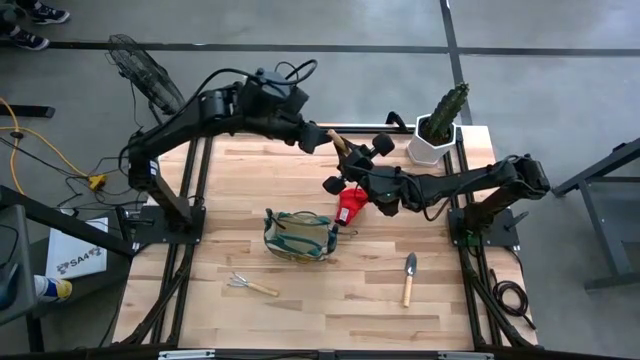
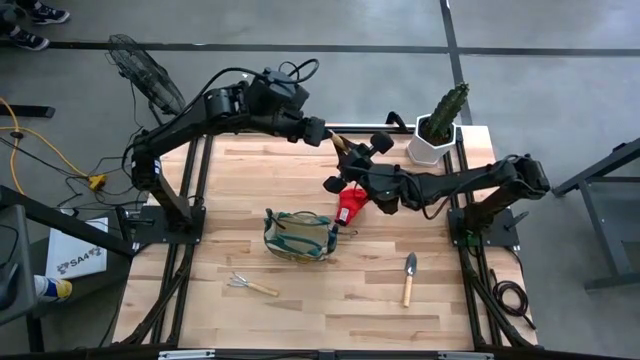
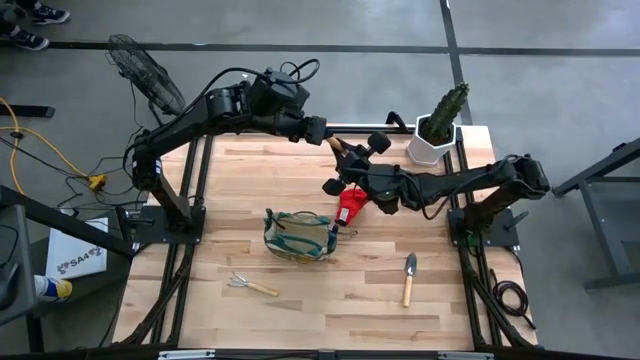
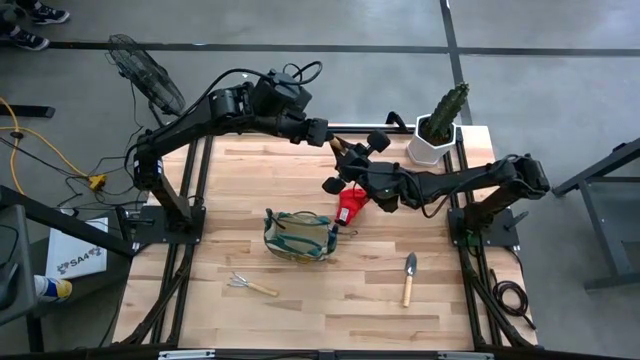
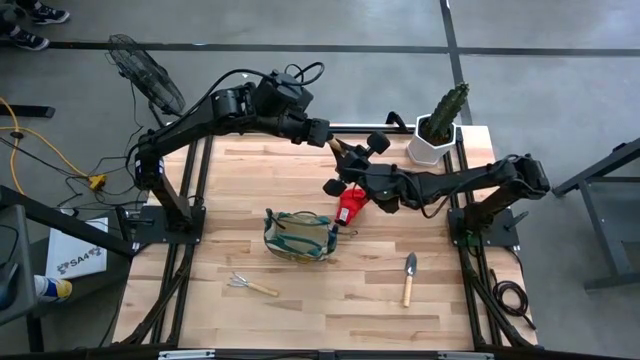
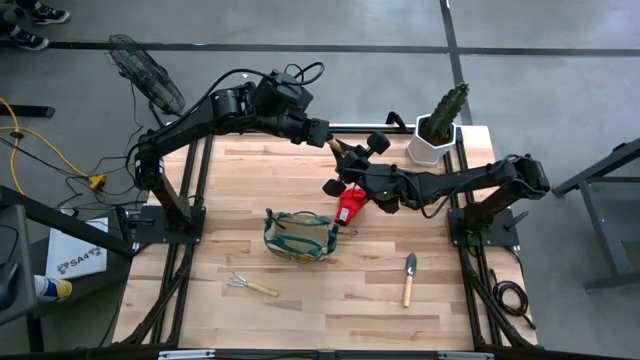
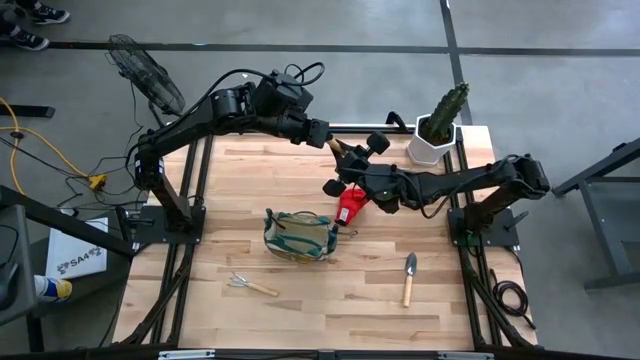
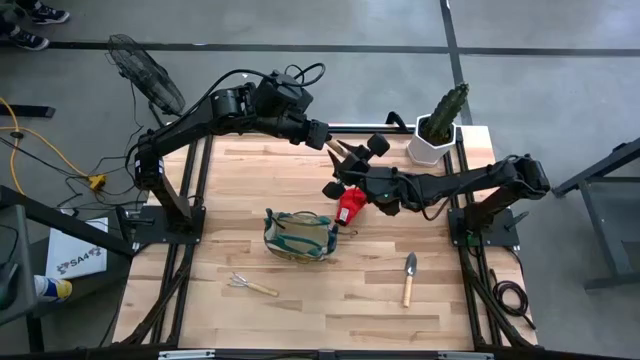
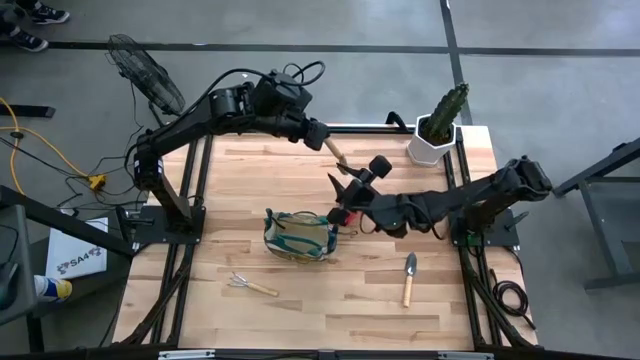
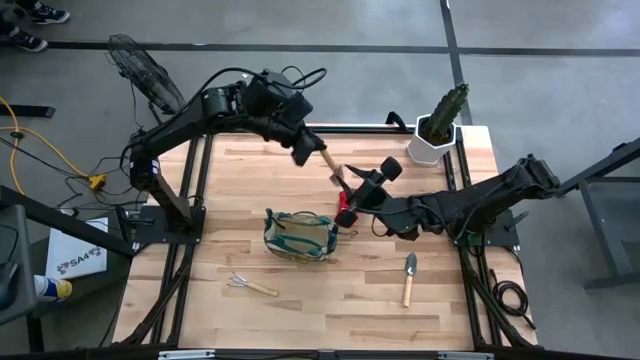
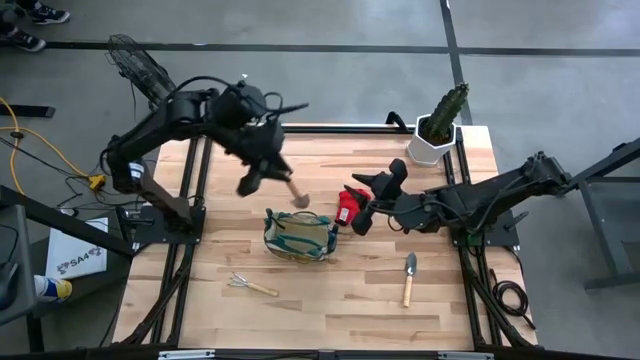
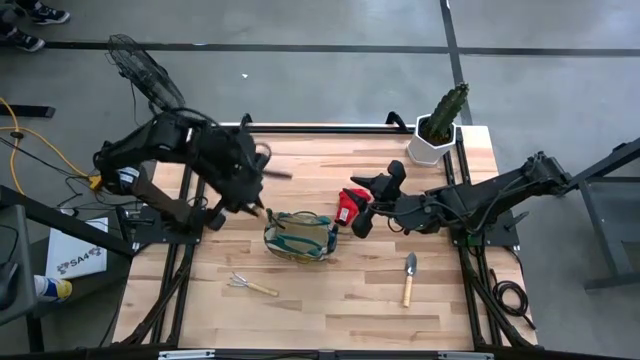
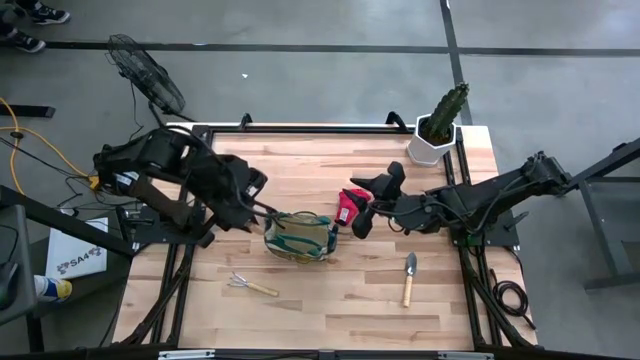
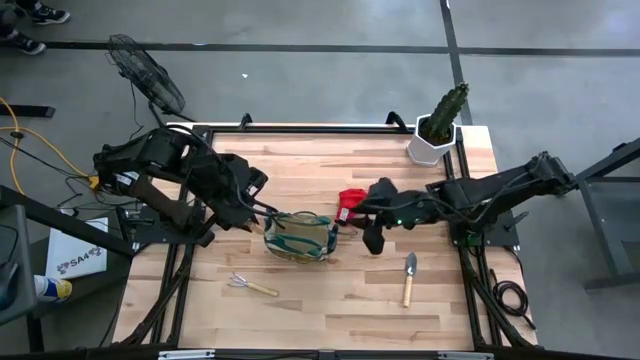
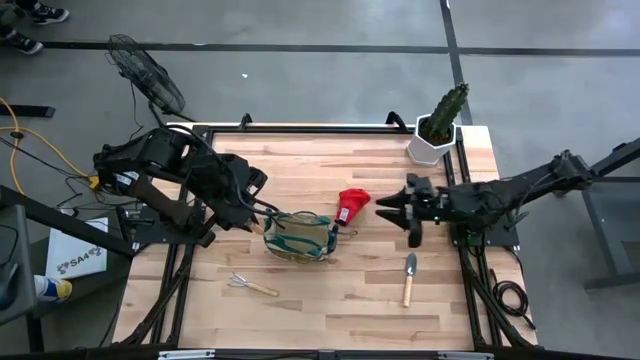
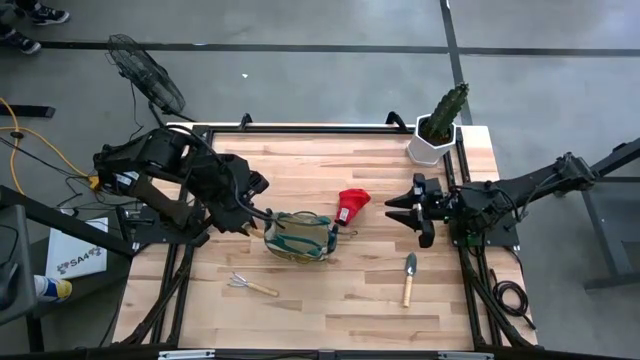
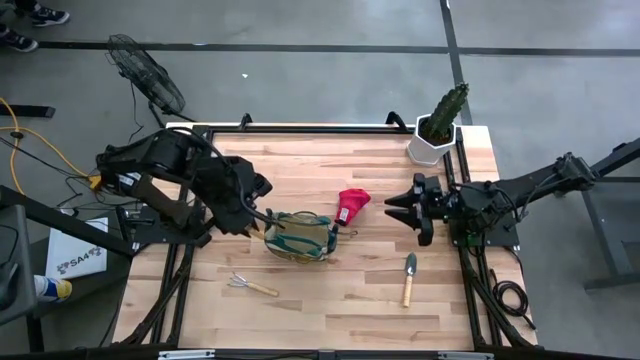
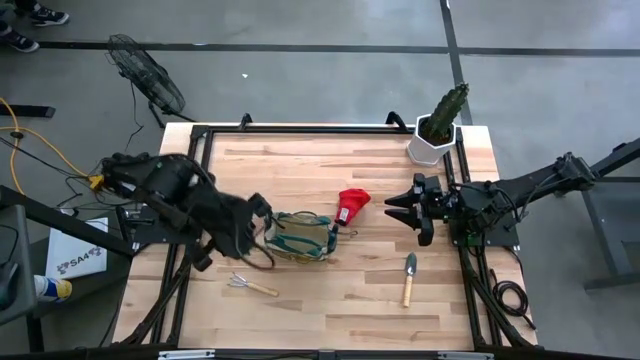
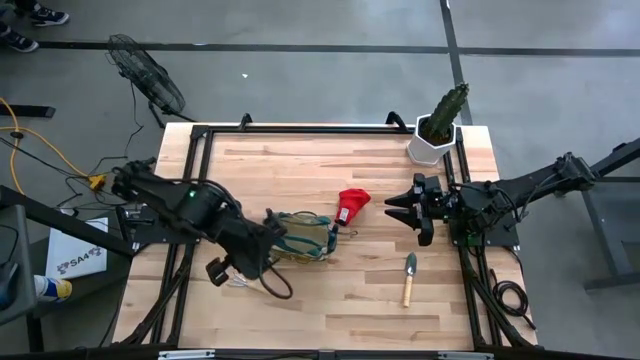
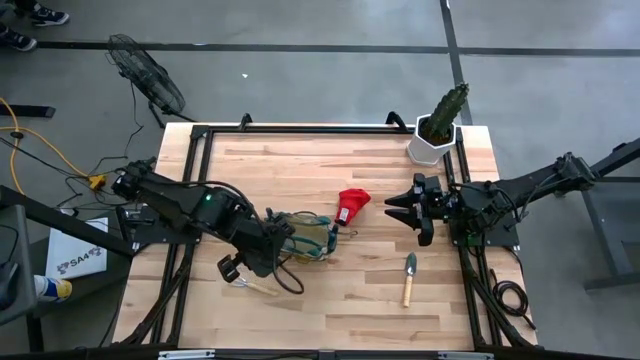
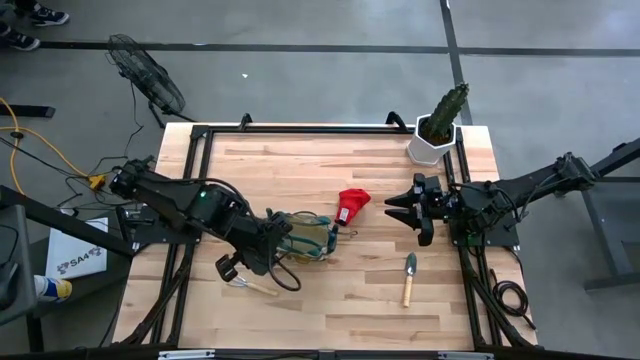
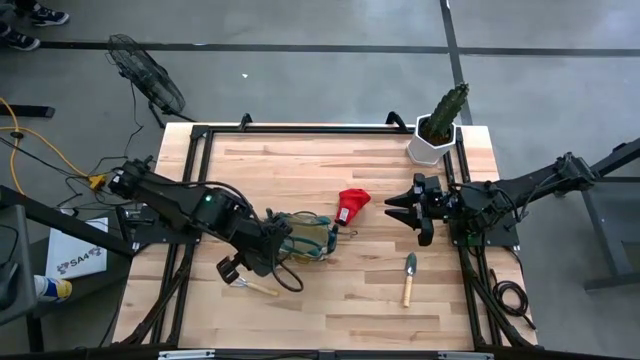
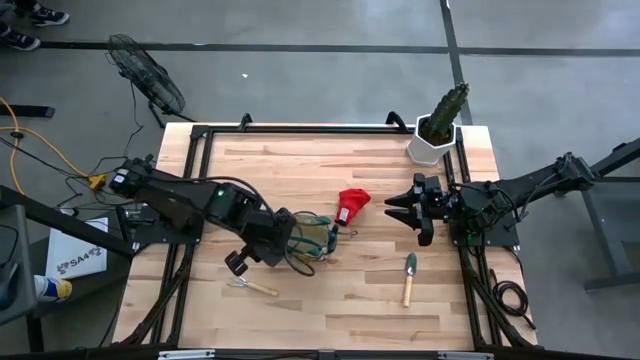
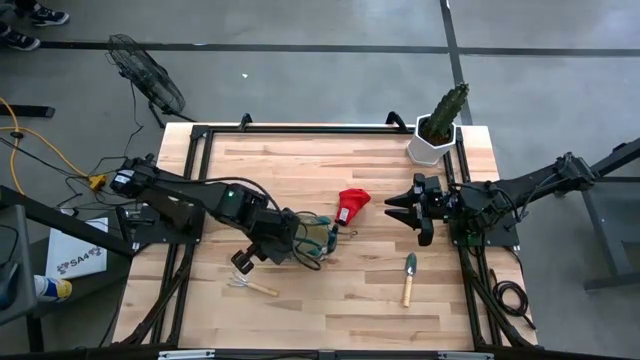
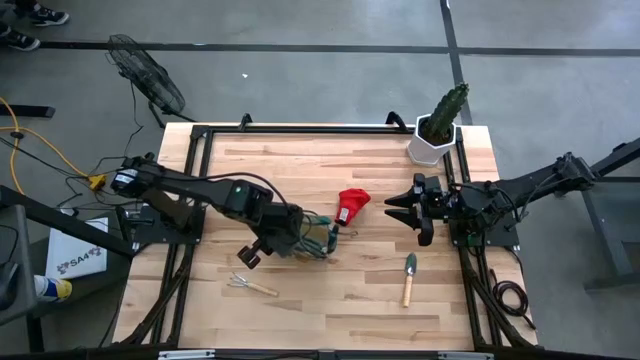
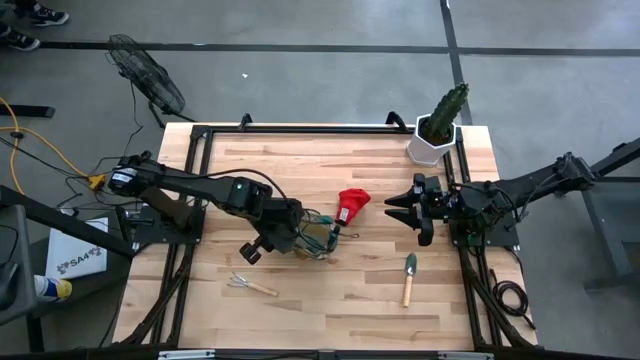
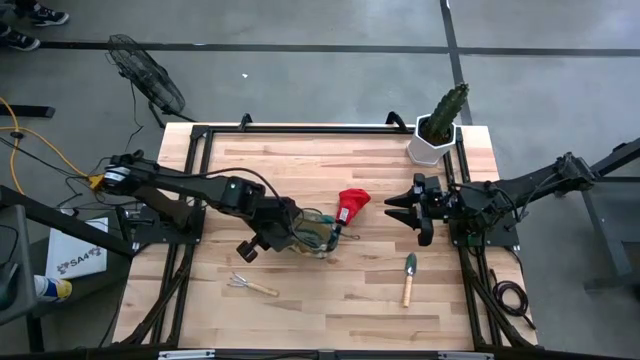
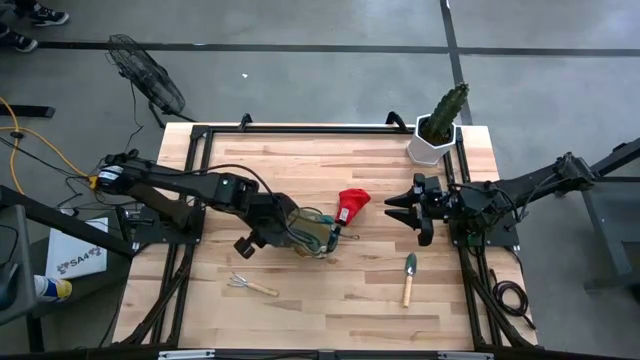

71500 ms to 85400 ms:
Task: Pick & Place Garden tools in Gardening bag
Put the left light brown trowel into the gardening bag

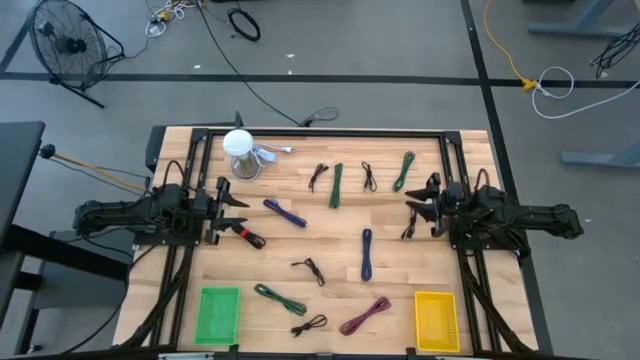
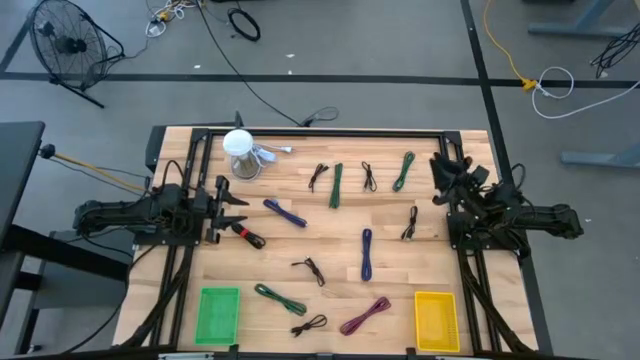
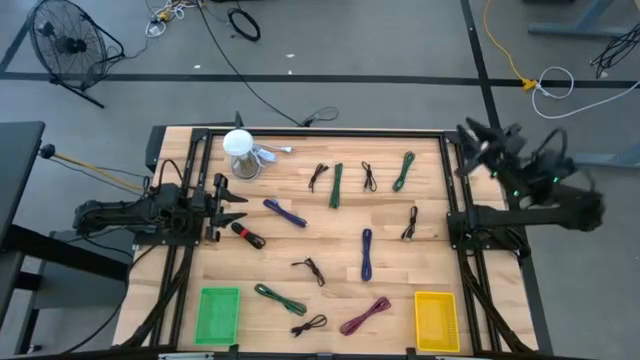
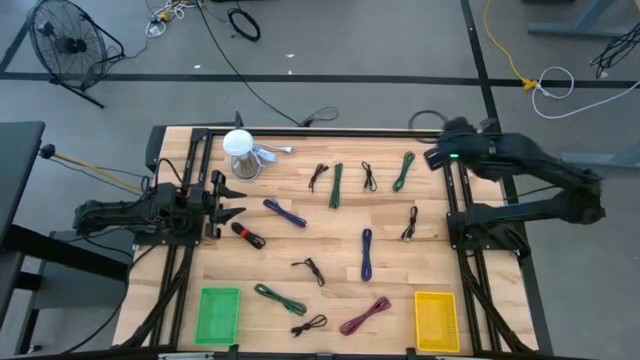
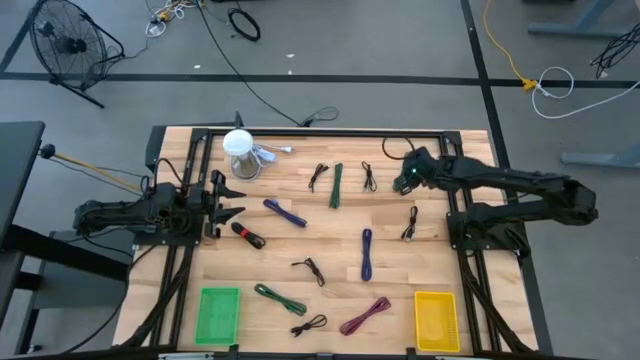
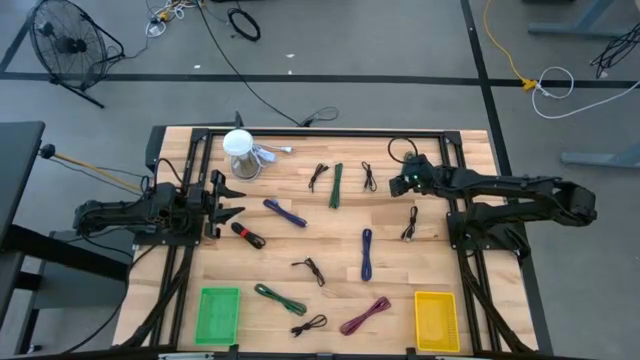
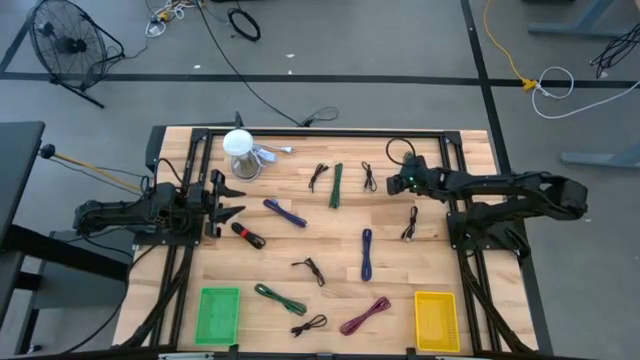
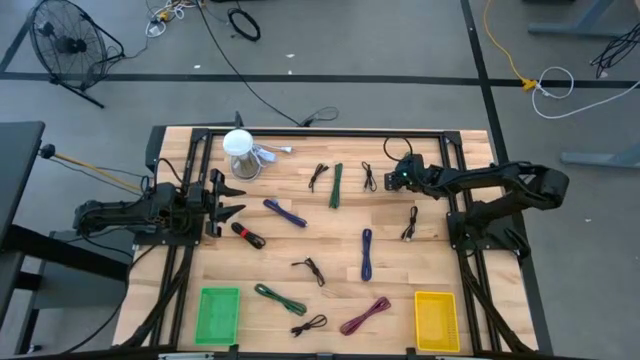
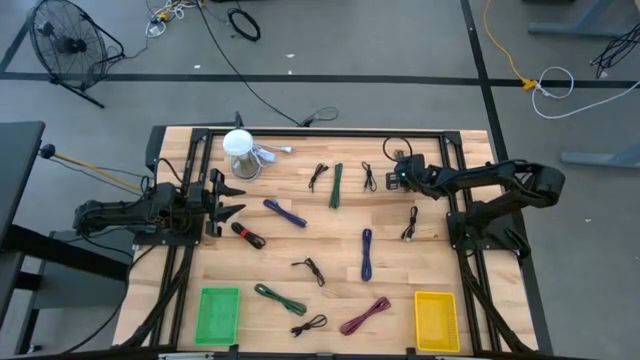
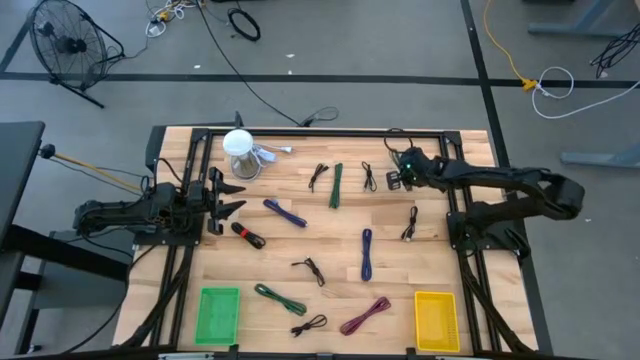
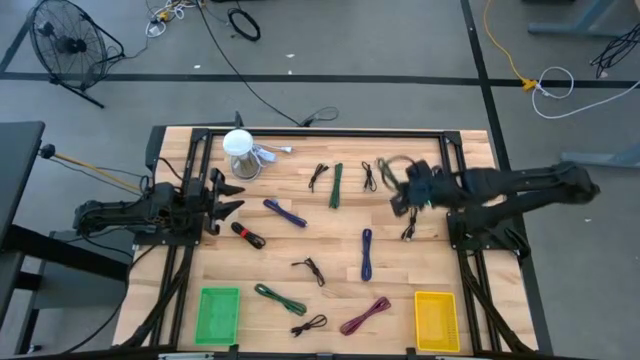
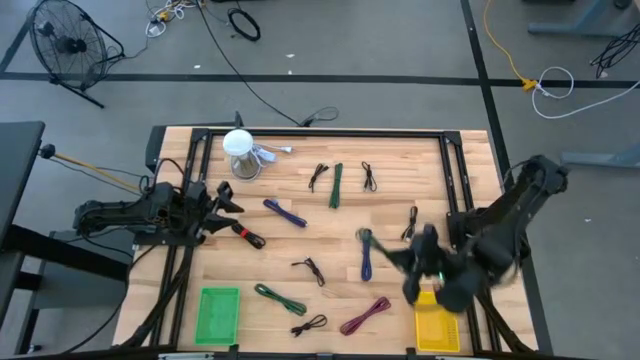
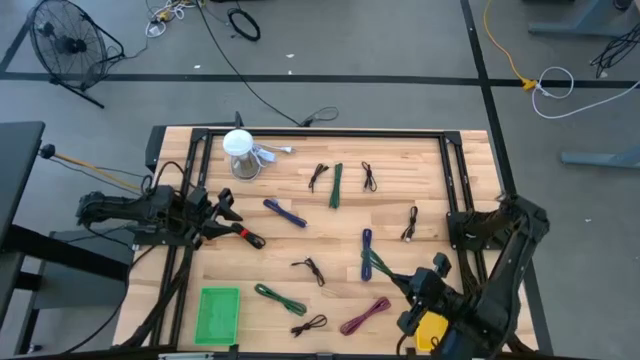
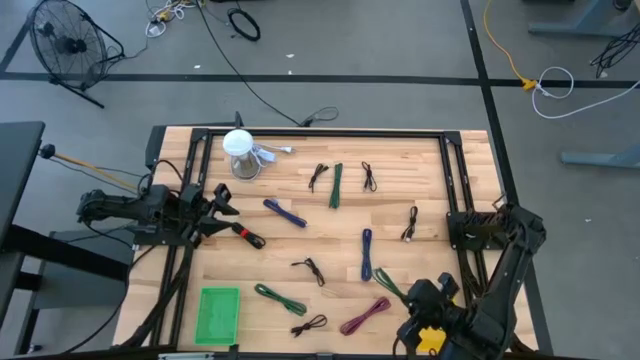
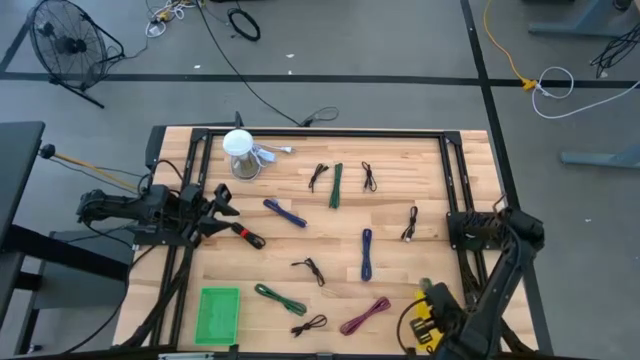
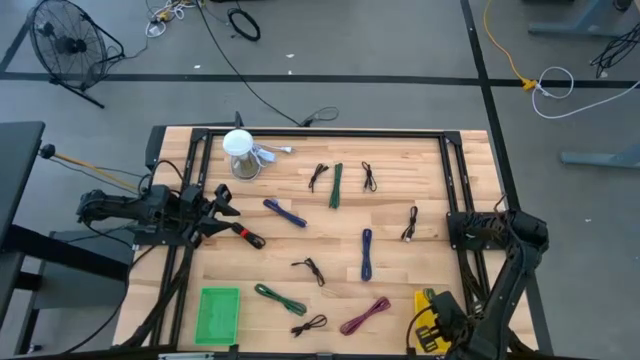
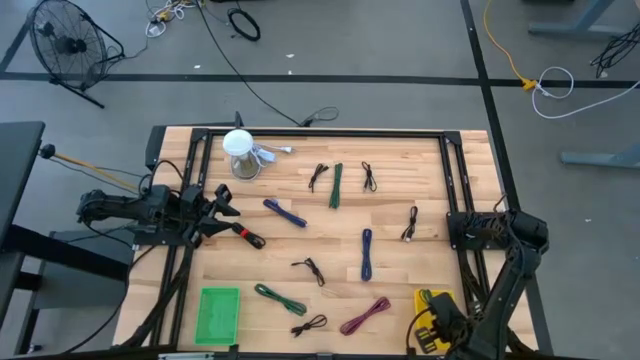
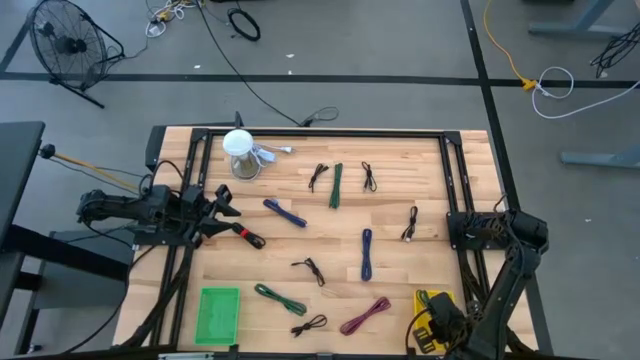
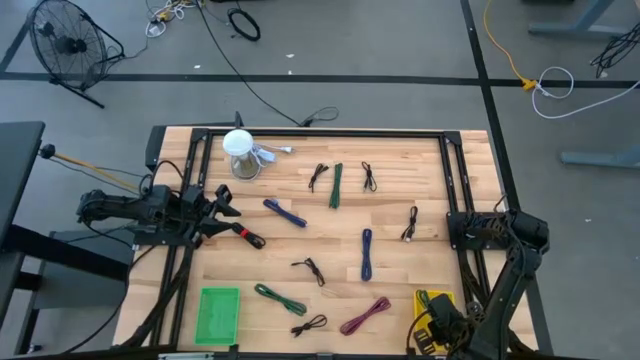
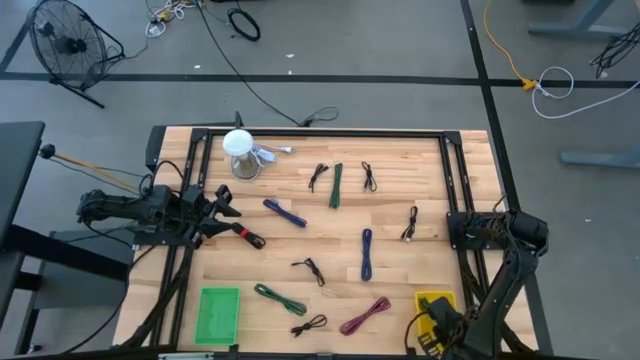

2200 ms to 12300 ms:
Task: Pick & Place USB Port
Put the black green charger cable into the yellow bin
